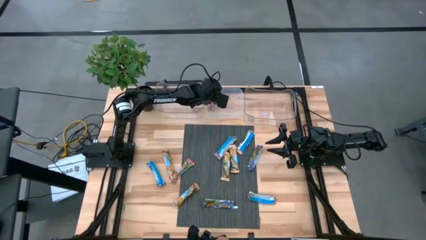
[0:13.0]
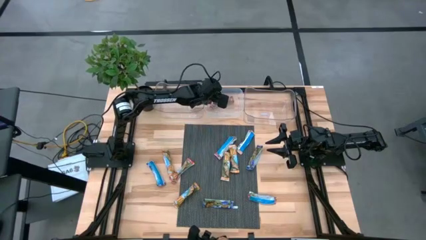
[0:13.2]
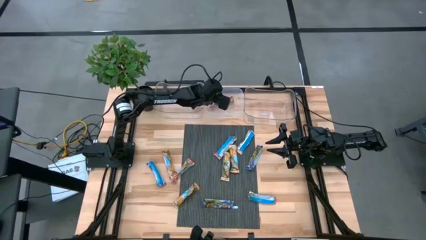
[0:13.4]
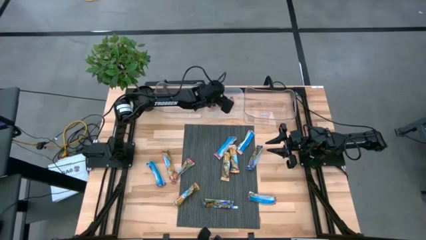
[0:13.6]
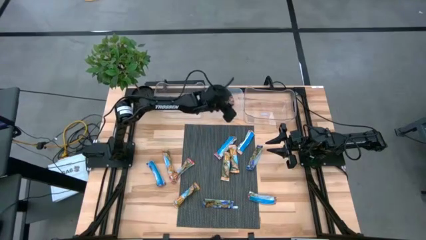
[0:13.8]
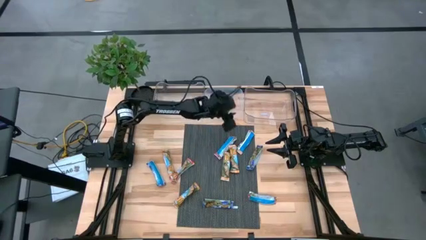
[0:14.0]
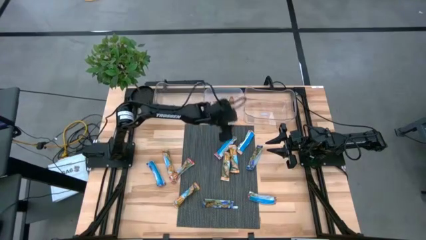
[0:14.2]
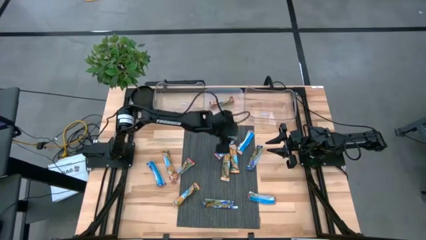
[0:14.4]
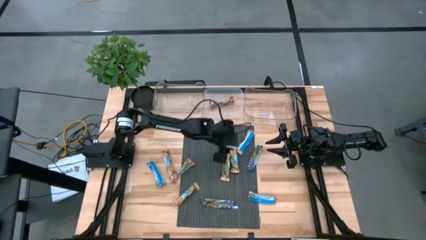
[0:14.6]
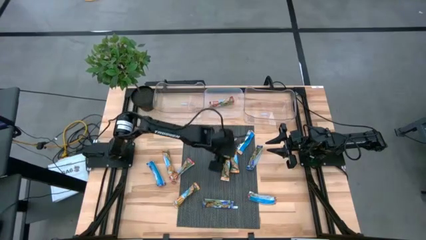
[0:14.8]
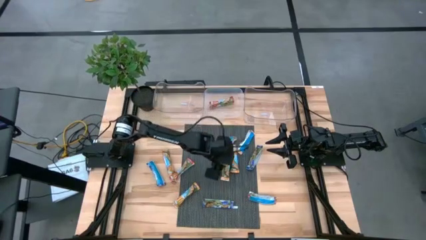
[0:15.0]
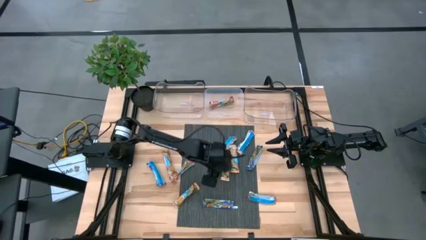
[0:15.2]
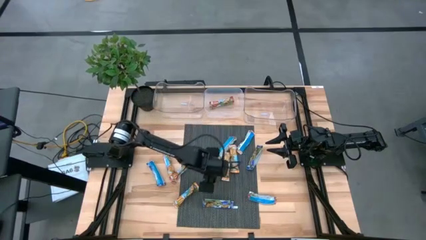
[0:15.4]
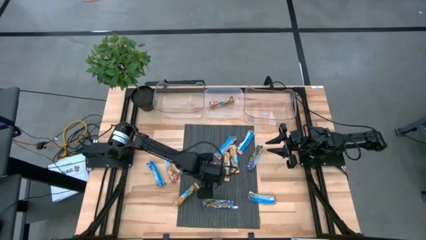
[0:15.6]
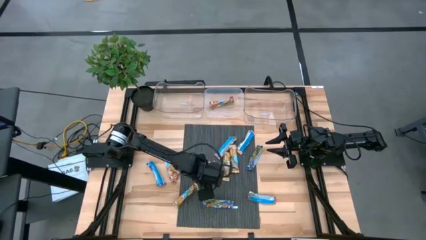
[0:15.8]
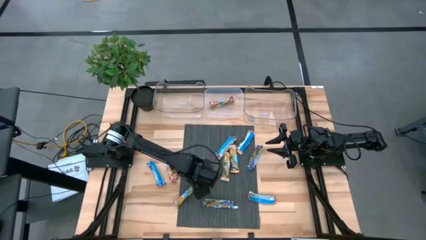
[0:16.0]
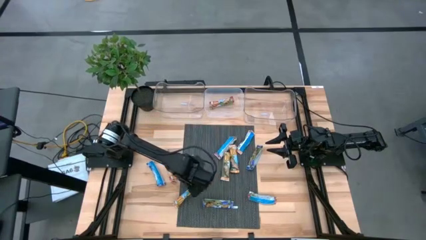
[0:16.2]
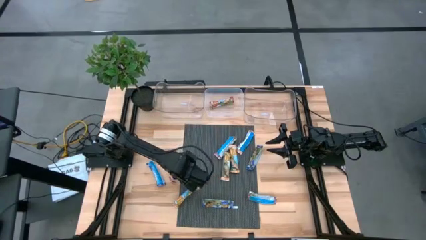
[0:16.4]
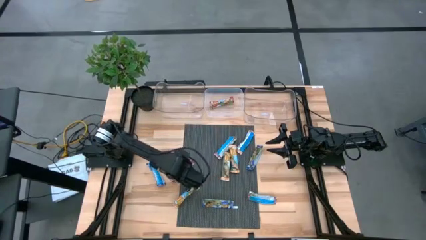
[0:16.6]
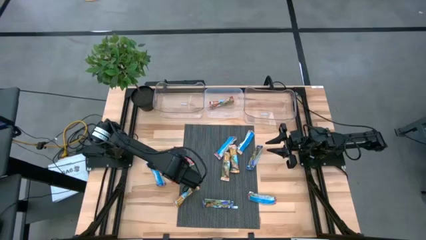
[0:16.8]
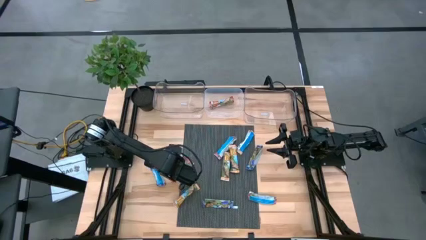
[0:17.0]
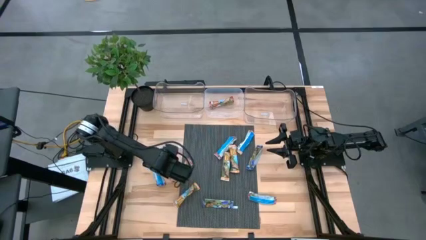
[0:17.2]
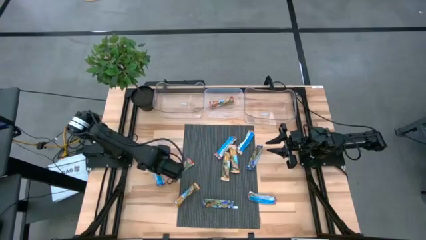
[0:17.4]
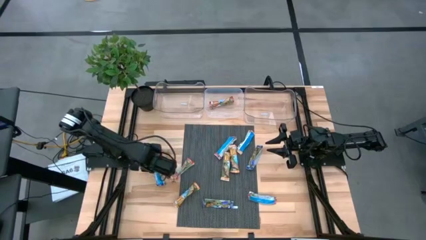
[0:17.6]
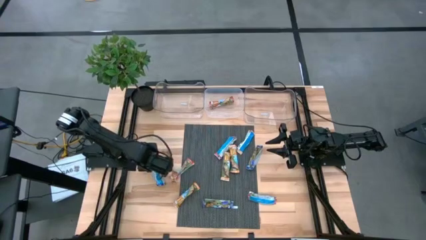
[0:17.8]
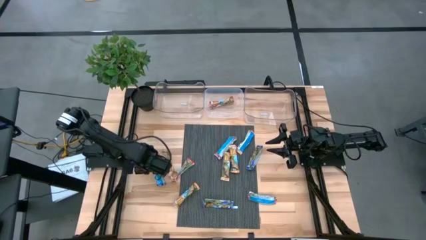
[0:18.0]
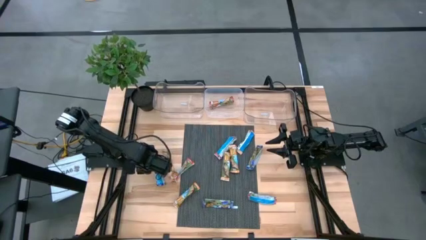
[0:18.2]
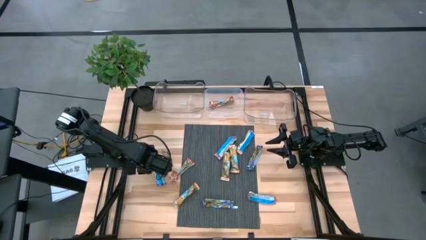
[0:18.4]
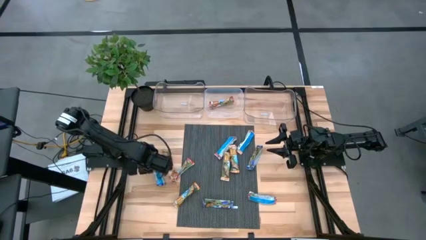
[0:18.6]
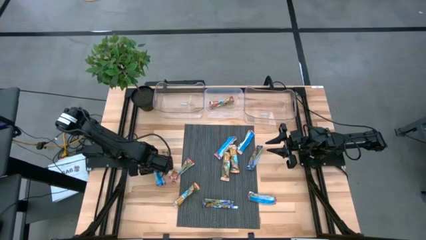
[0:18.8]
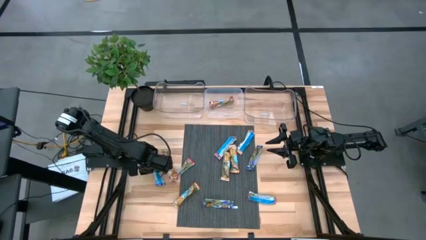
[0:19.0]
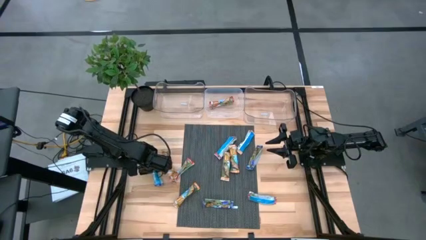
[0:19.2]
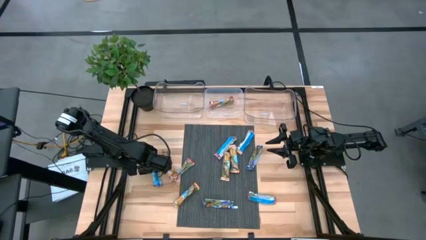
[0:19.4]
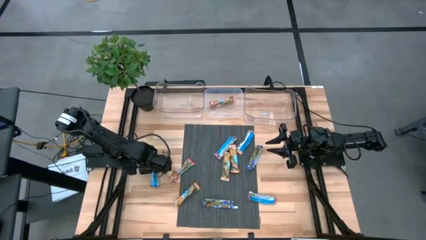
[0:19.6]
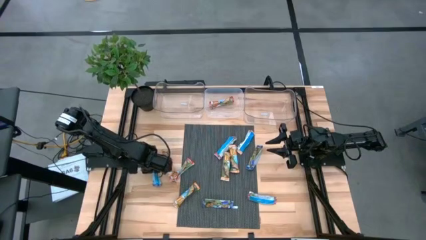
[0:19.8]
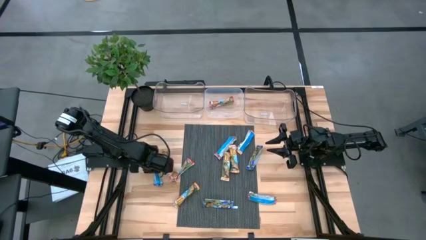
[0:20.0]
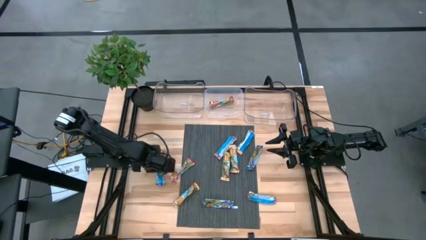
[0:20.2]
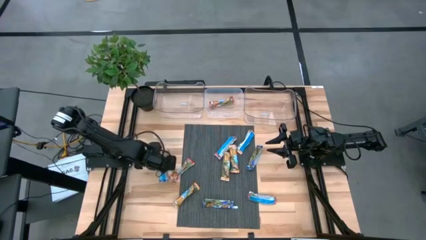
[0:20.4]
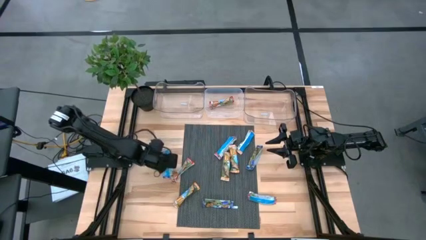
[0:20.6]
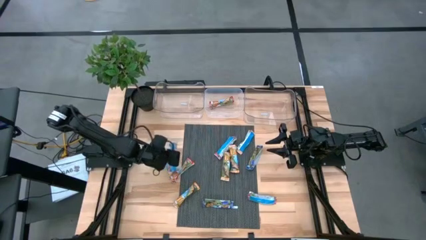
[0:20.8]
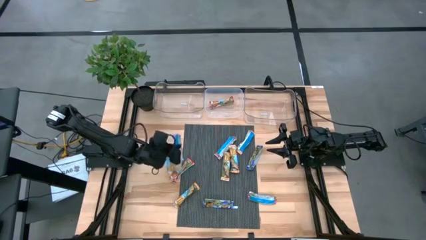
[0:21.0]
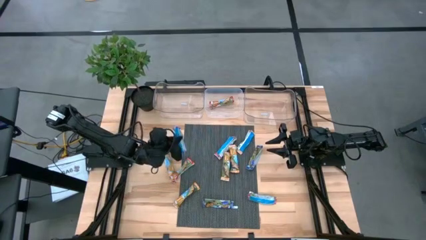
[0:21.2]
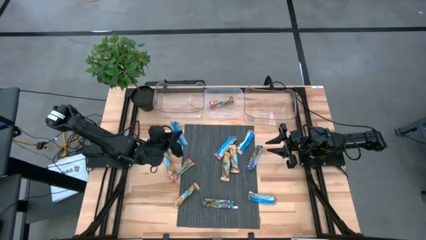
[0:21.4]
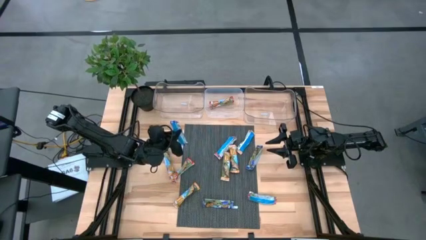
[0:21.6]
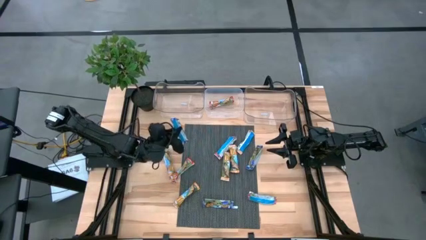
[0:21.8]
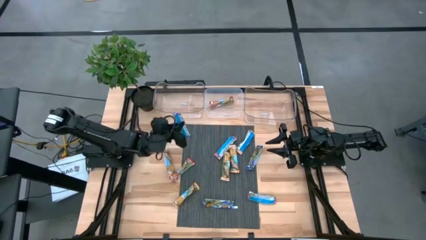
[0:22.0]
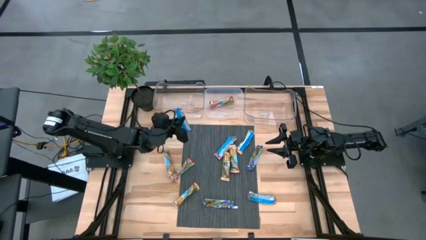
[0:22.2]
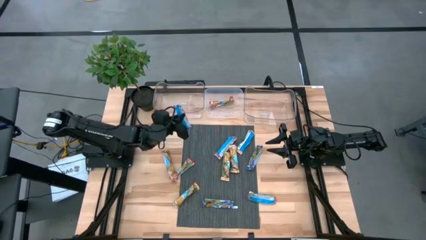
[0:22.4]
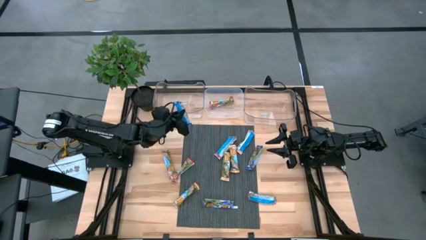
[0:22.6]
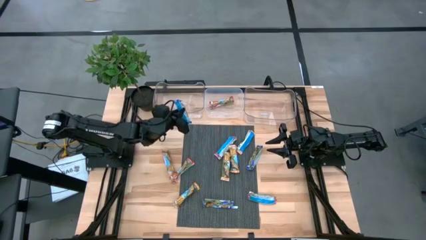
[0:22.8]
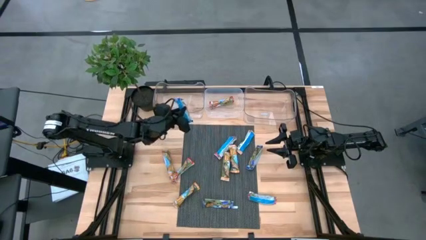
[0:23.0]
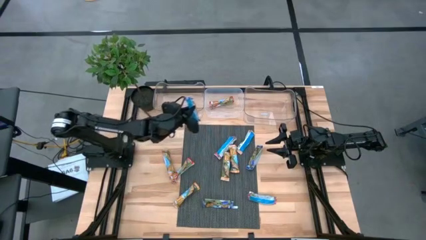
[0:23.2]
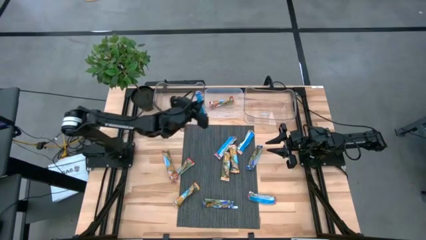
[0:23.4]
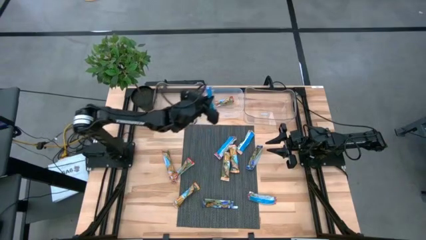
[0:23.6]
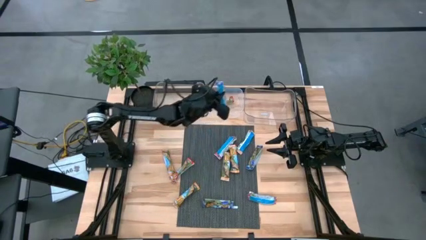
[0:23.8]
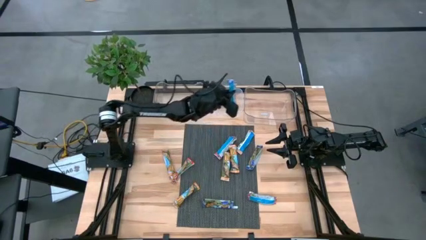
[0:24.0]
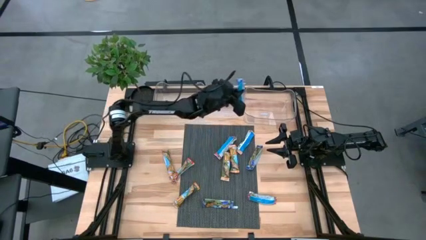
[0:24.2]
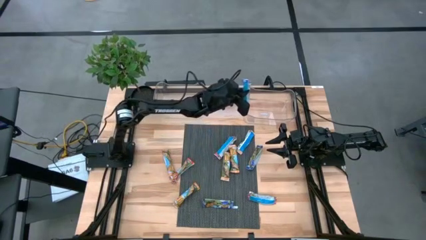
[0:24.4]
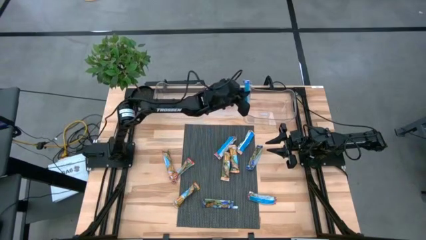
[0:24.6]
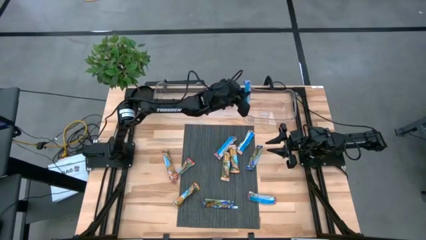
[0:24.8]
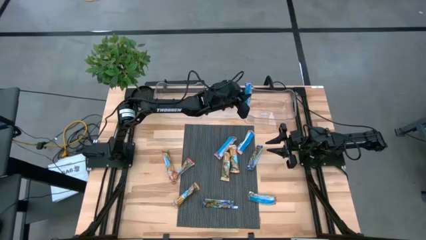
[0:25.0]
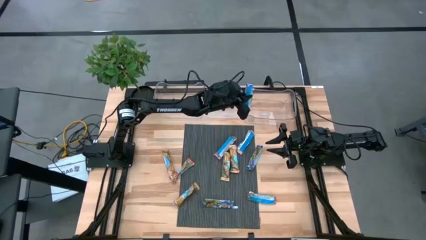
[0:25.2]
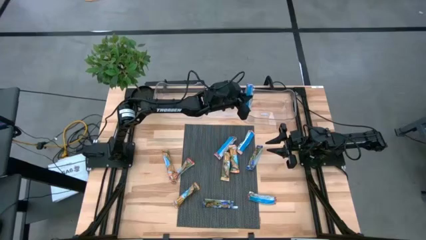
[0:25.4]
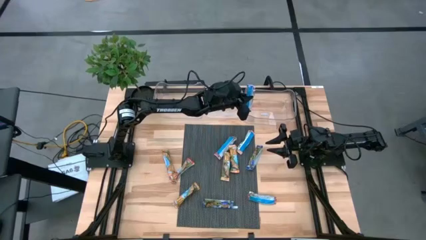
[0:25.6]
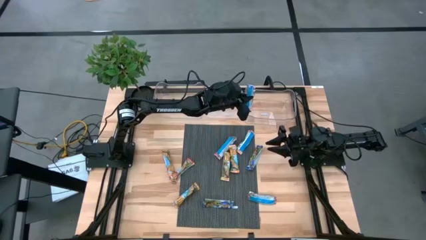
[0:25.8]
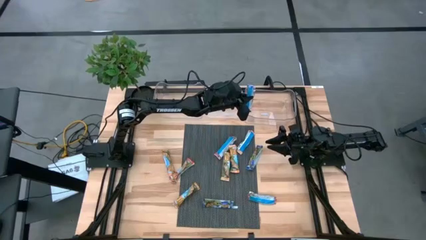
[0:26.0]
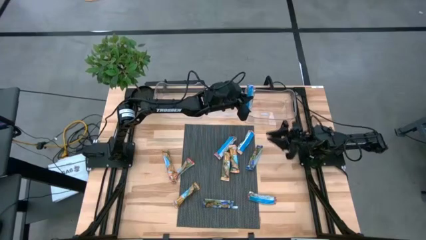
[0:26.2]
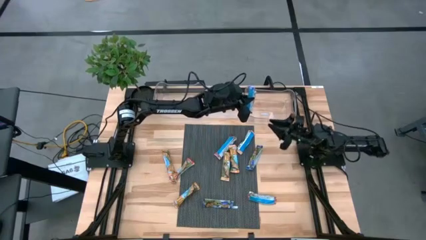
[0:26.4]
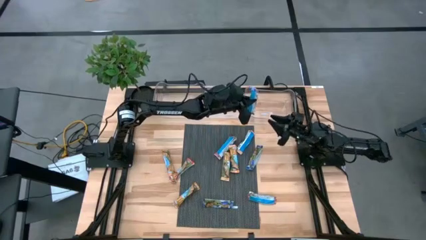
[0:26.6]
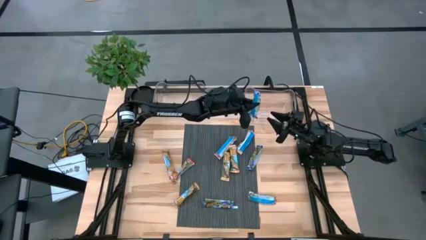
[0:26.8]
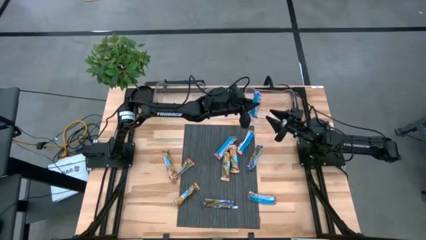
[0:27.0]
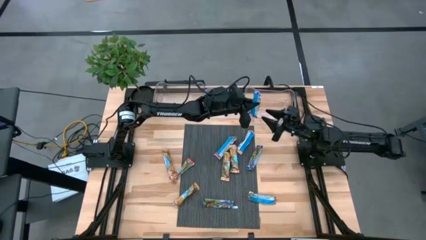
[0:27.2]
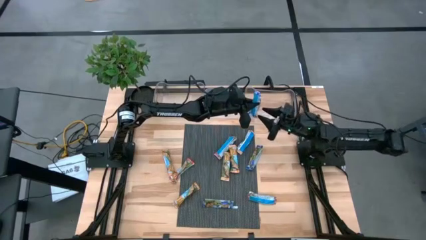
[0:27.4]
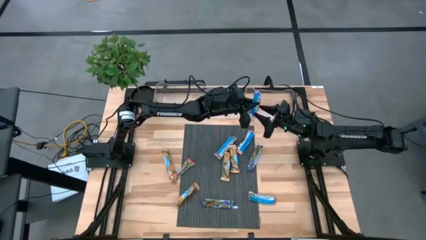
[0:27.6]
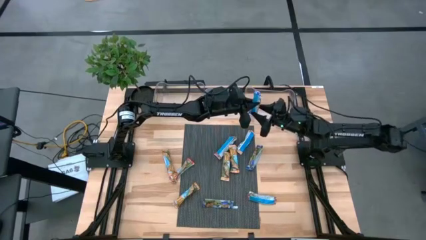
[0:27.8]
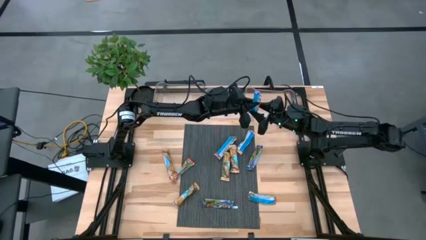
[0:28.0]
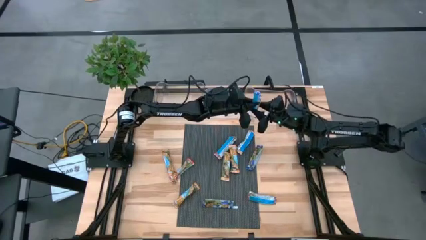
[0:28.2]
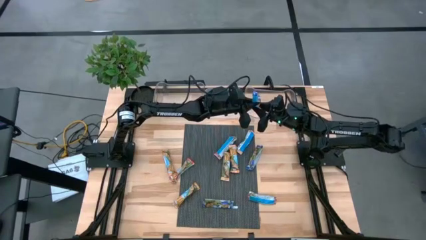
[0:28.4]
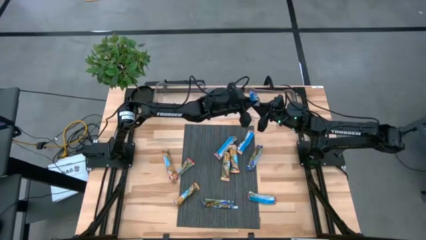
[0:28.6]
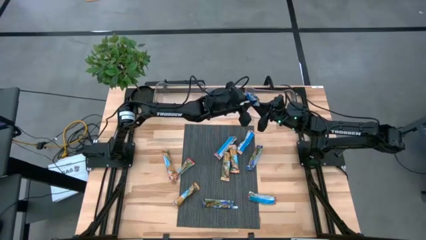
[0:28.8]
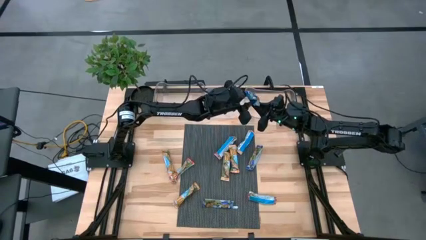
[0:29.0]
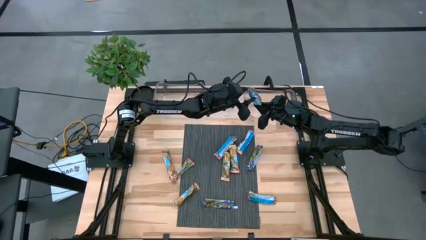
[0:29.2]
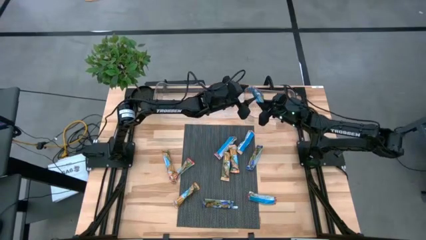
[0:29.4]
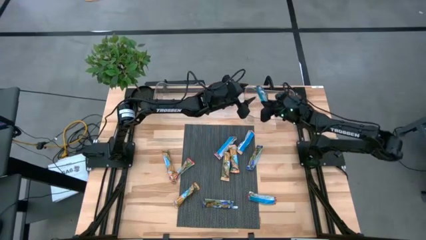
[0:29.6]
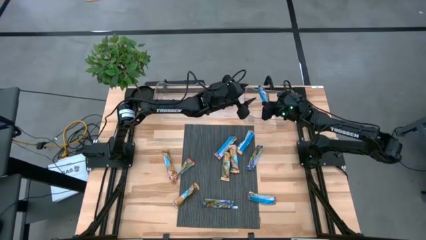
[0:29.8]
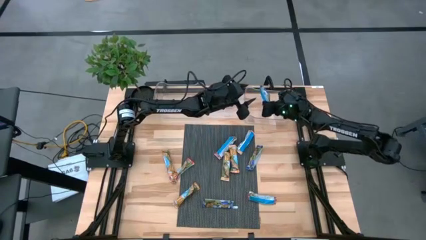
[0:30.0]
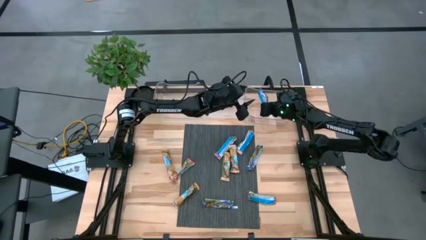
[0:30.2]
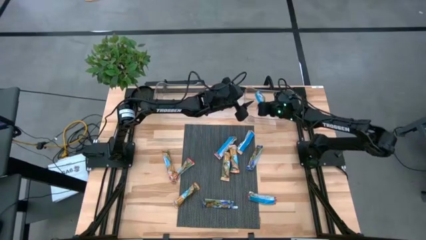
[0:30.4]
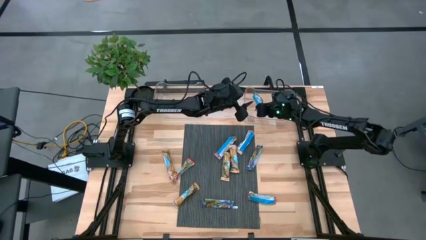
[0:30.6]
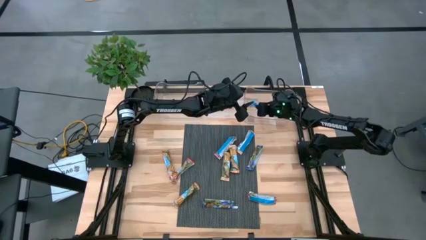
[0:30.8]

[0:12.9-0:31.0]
Task: Pick and place Granola Bars by type
Put the left blue granola bar into the right transparent bin
